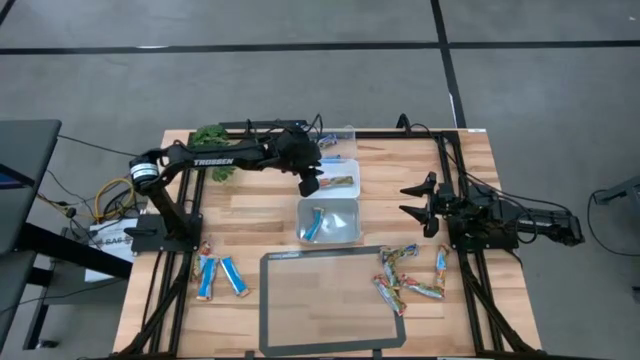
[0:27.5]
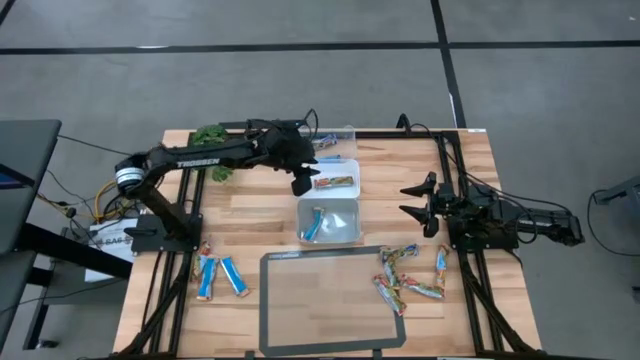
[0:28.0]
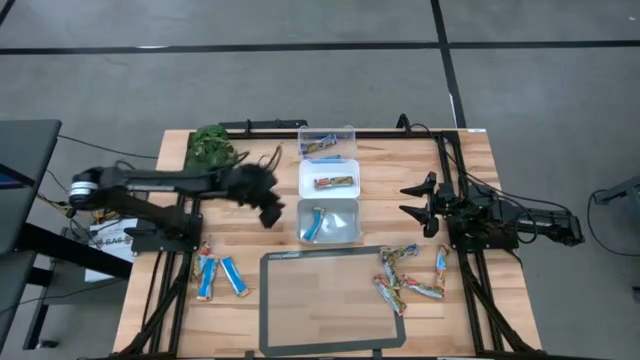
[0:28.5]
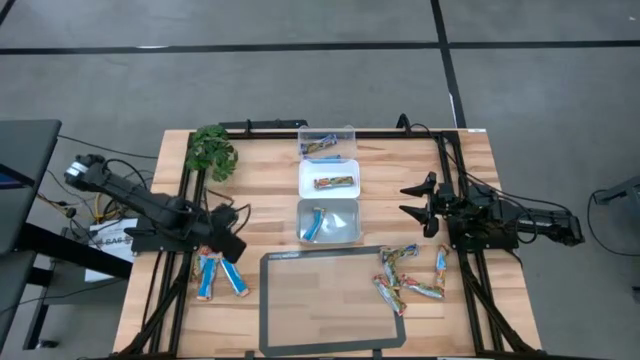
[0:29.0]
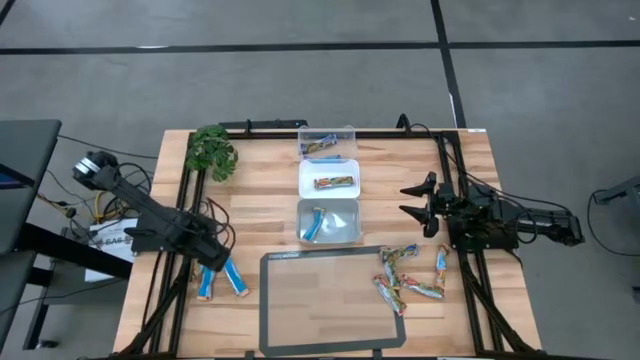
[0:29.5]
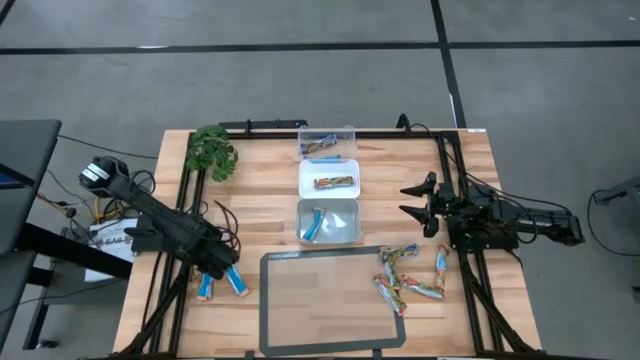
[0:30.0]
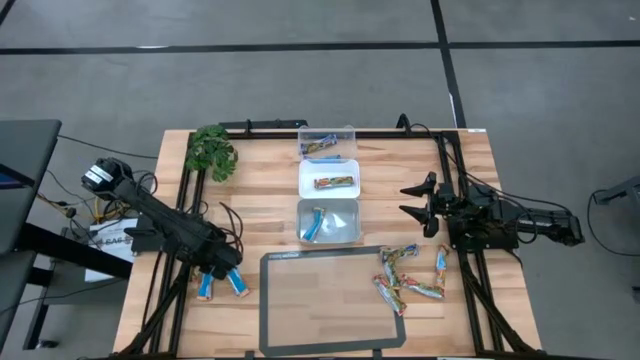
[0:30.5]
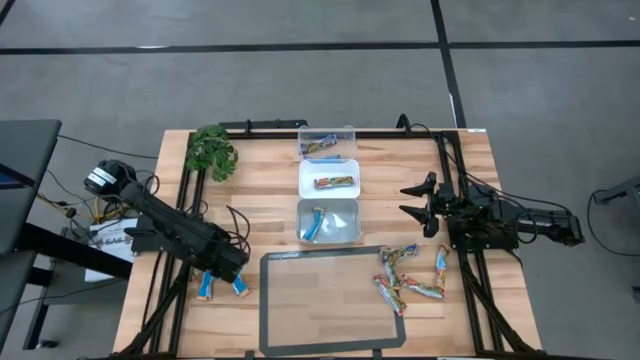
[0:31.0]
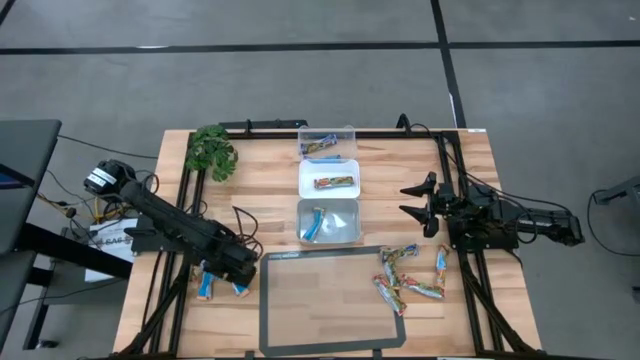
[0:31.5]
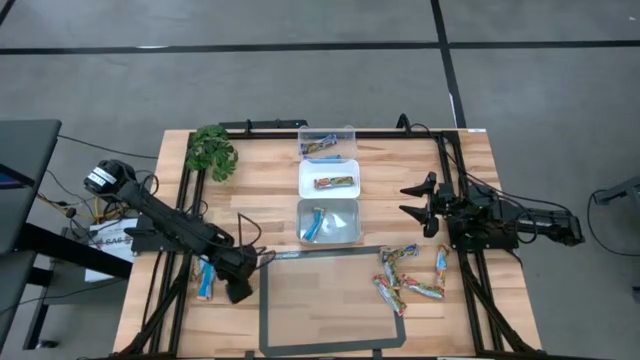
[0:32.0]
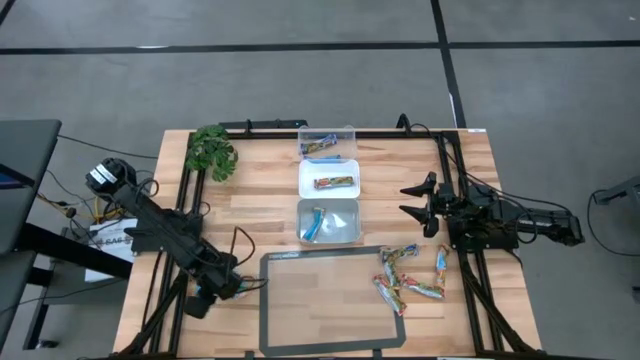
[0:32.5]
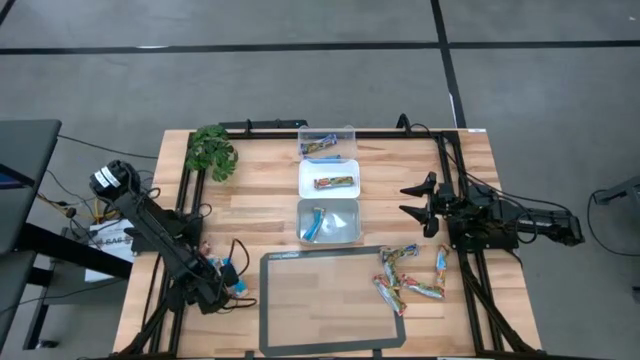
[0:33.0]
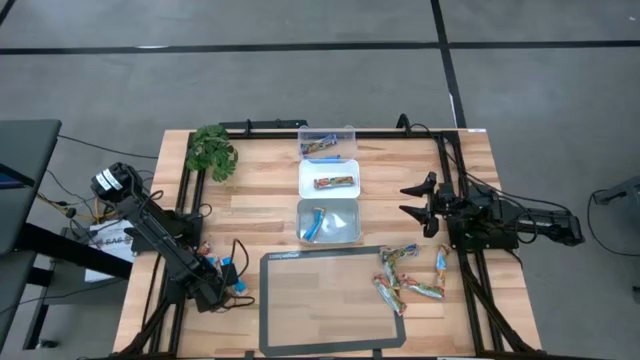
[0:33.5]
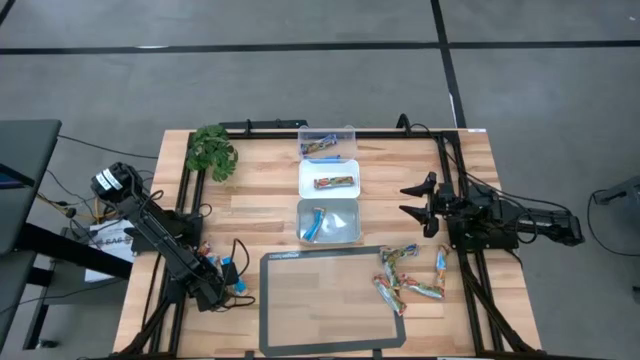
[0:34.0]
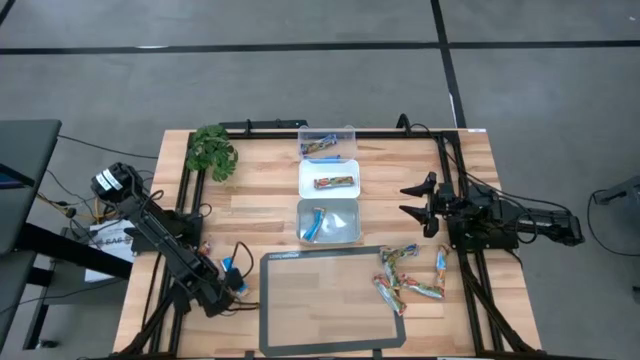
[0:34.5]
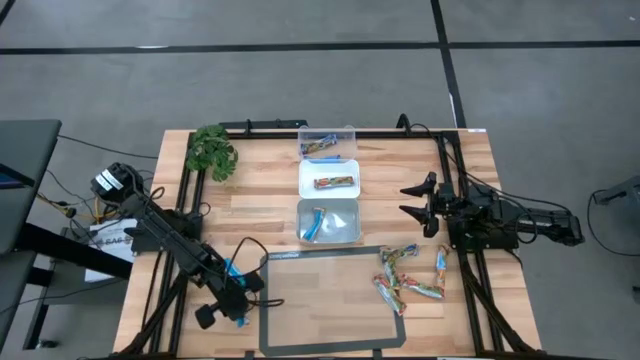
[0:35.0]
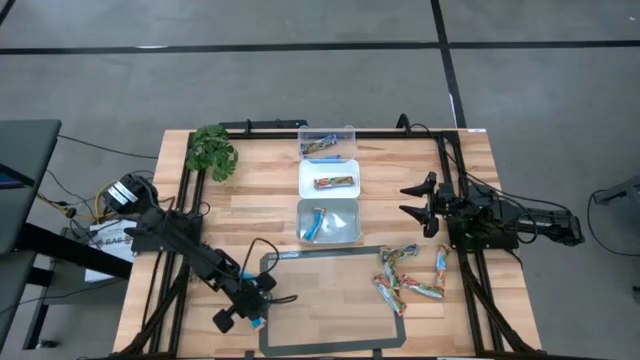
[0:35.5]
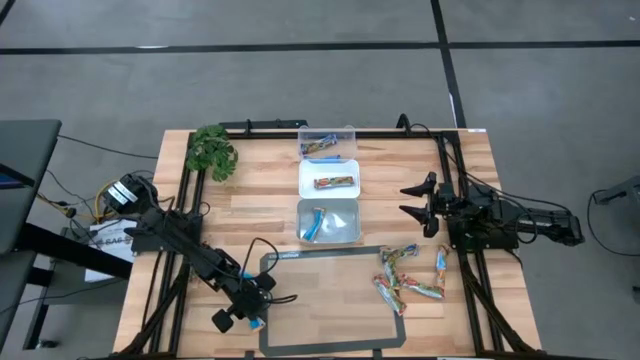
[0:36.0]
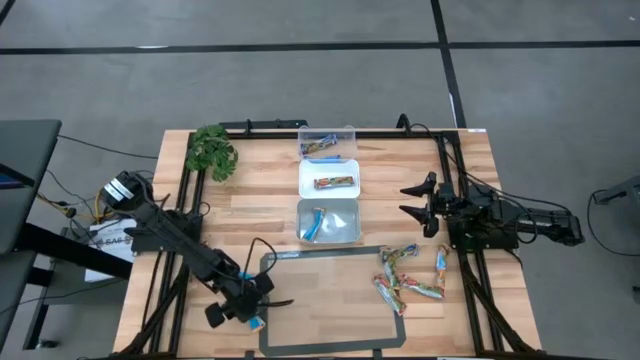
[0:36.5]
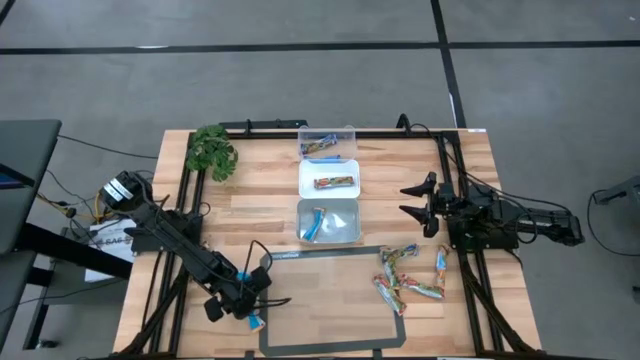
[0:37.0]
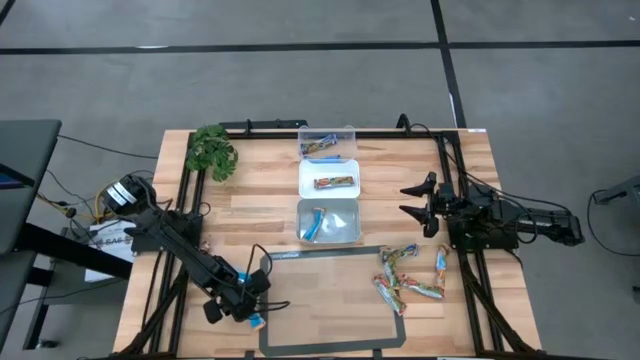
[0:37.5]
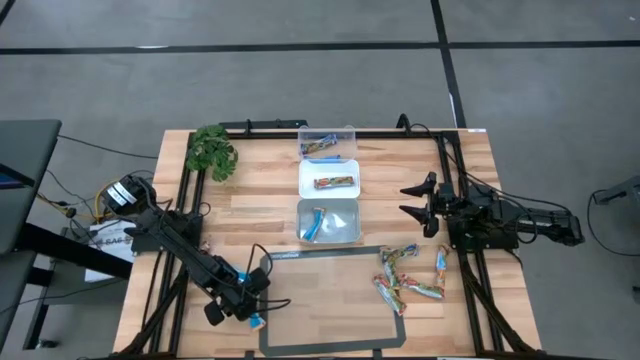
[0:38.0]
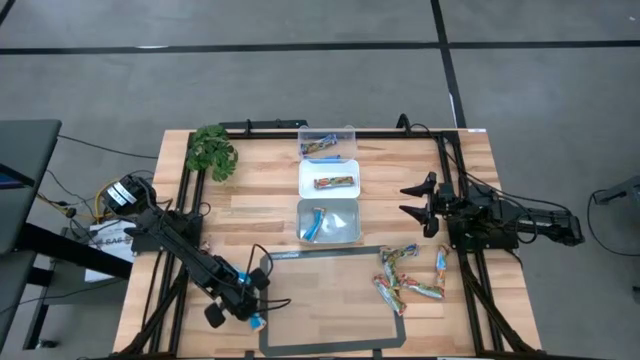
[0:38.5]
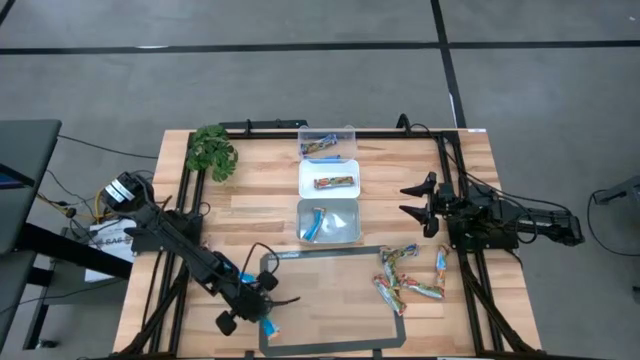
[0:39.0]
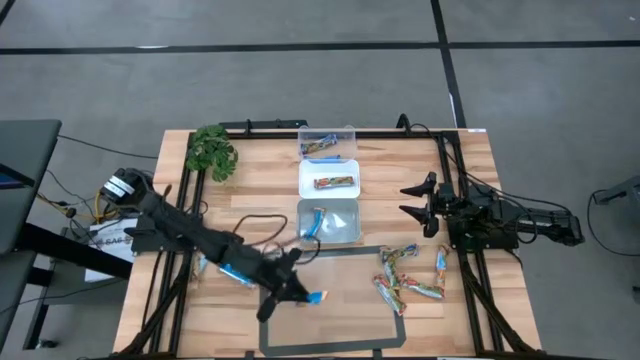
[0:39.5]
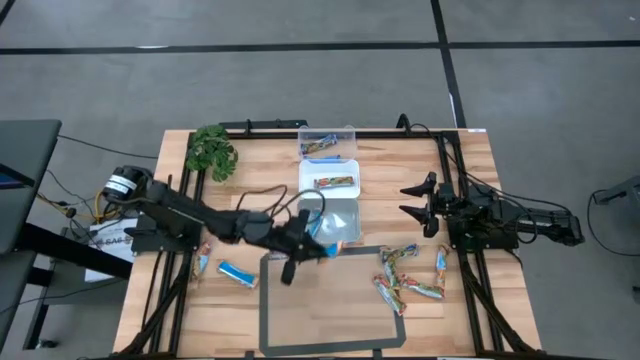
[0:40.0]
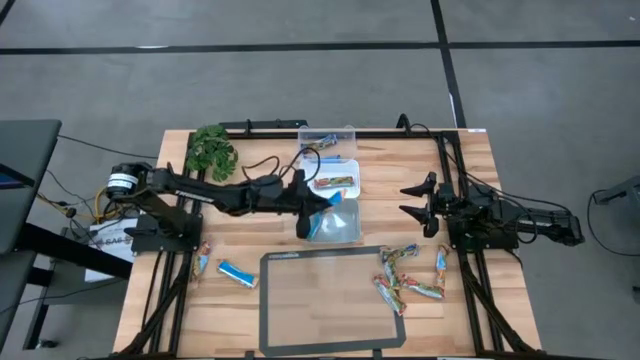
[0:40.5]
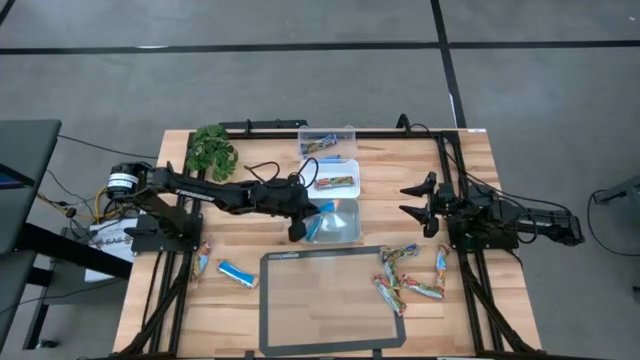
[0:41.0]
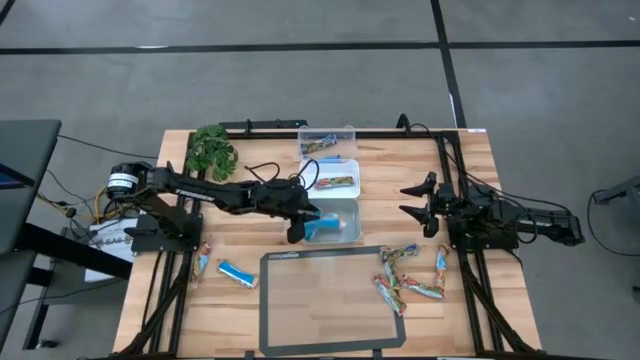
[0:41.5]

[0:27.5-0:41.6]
Task: Pick and place Granola Bars by type
Put the orange granola bar into the gray bin

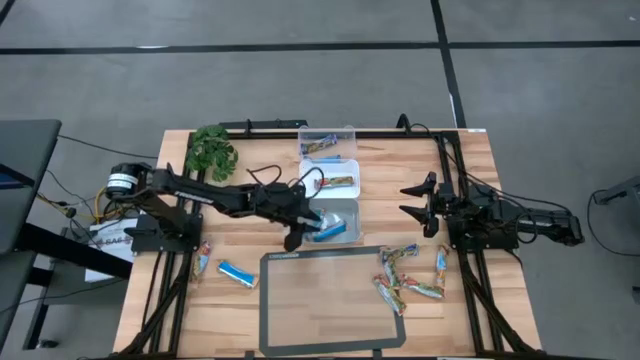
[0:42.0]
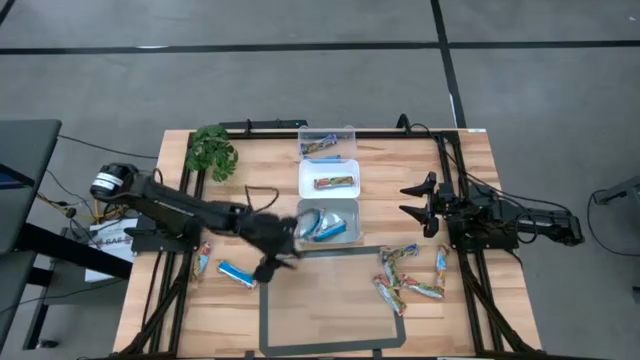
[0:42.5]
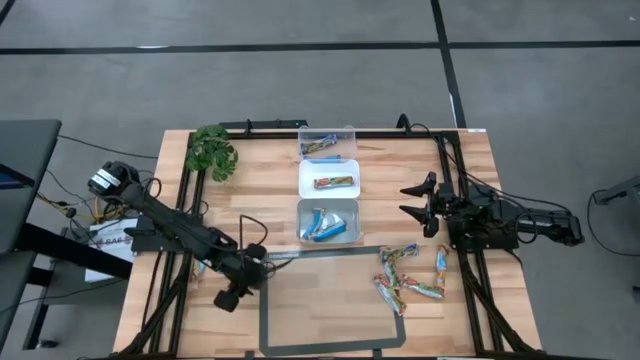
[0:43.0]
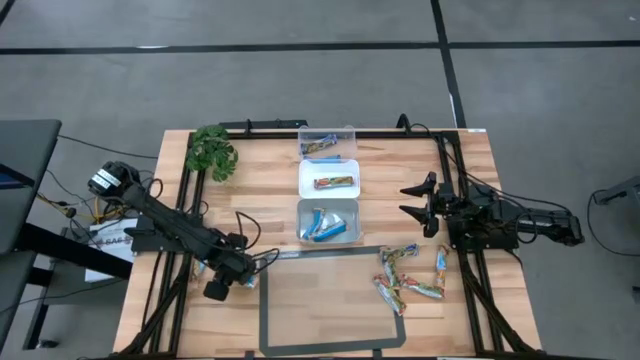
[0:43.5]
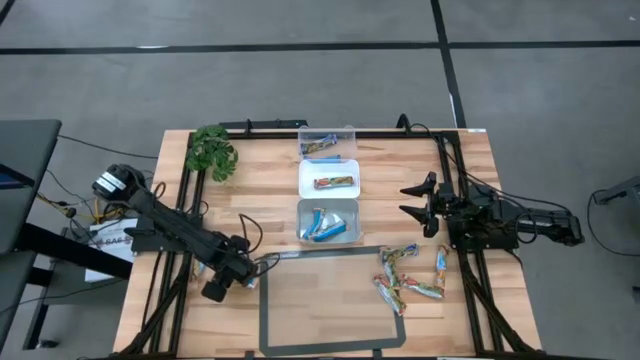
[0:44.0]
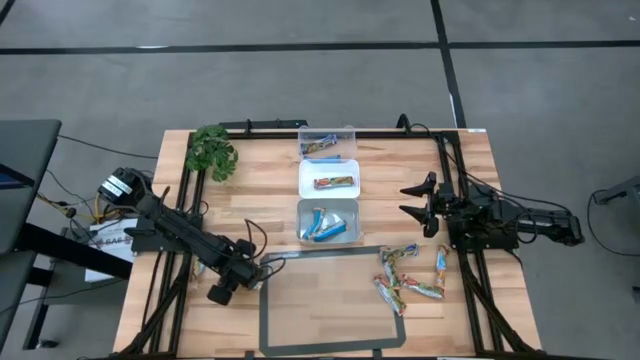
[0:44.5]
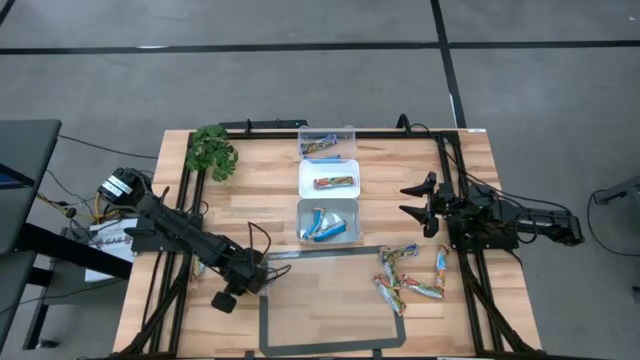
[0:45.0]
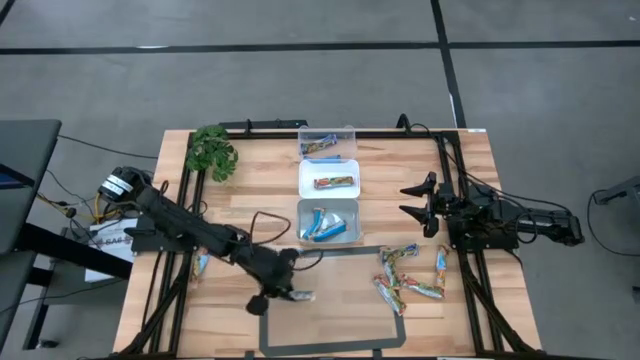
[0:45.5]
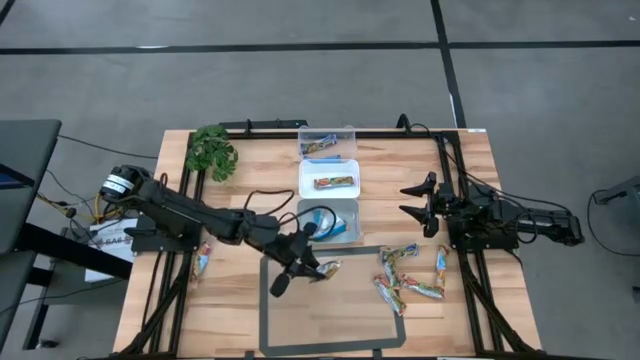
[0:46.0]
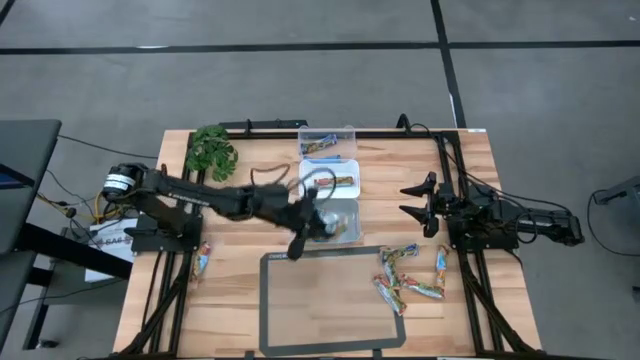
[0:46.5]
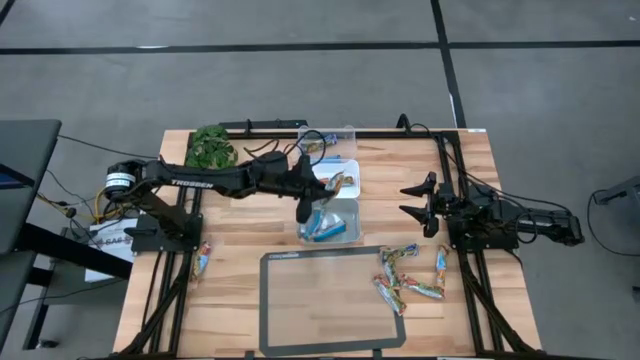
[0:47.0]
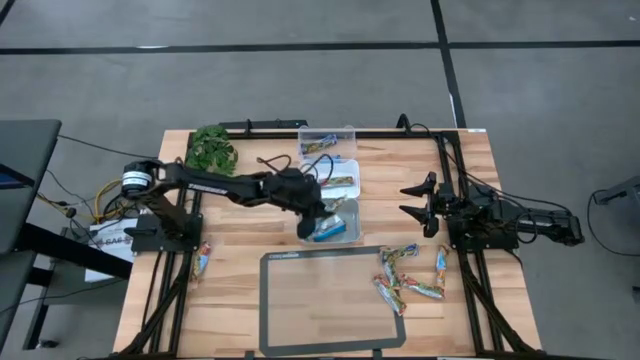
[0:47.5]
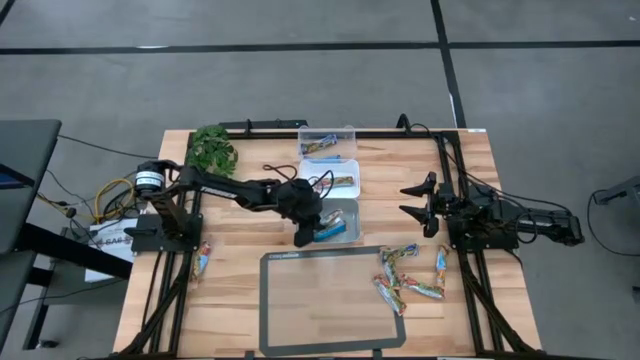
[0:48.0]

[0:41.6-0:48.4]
Put the orange granola bar into the gray bin
